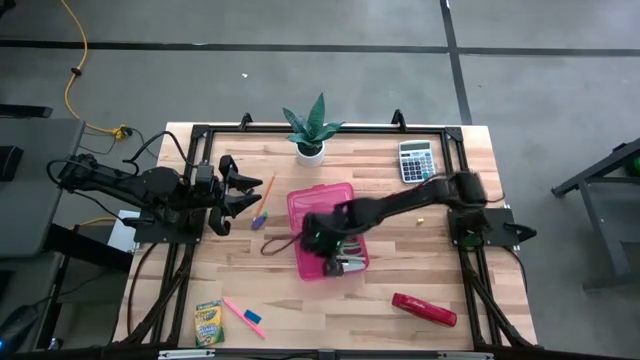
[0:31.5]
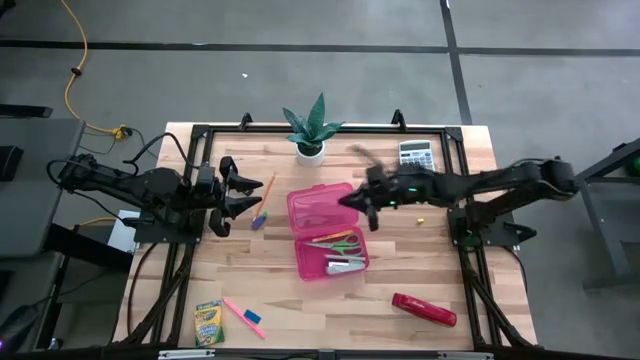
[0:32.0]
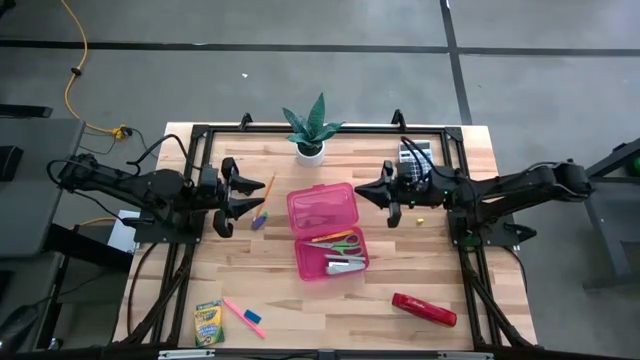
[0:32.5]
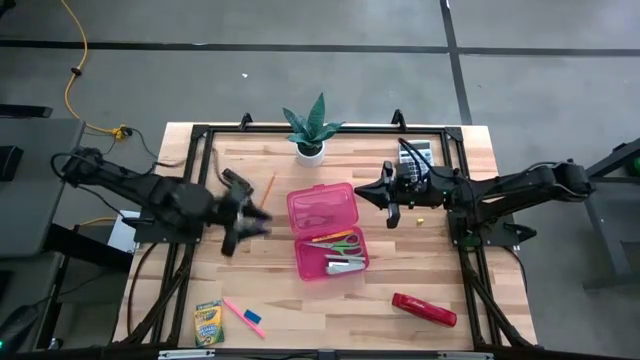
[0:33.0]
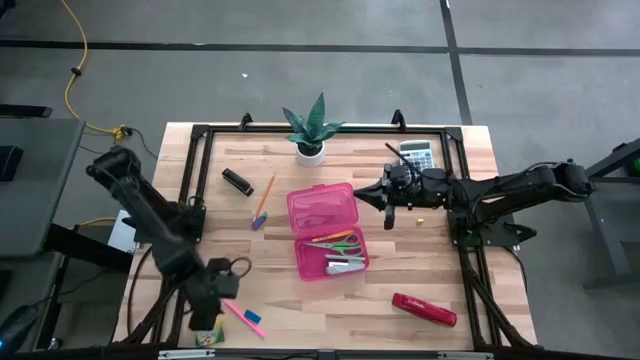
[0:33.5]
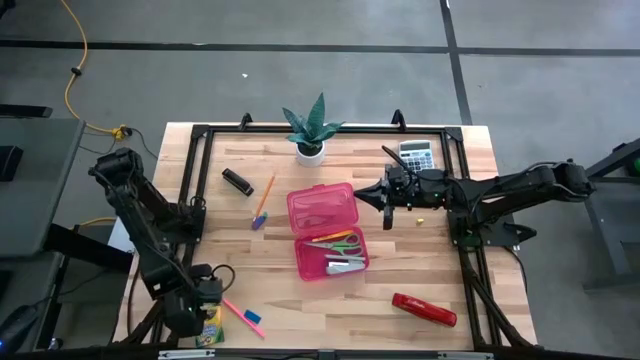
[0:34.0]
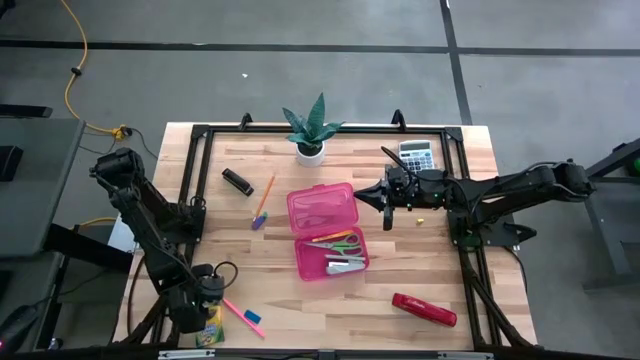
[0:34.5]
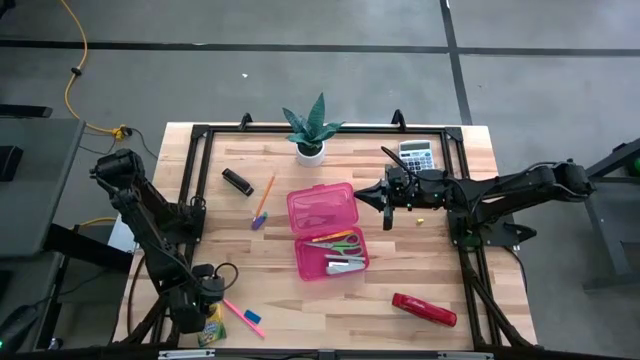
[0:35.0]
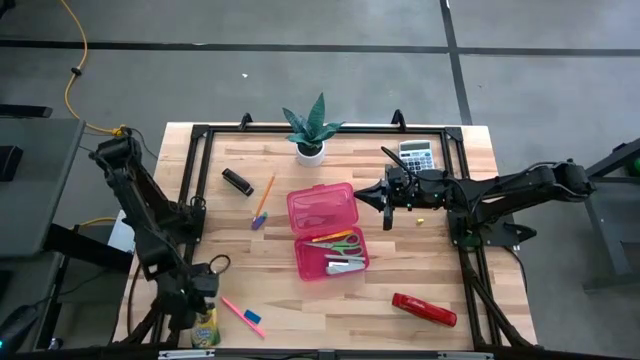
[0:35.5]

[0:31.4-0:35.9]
Task: Pack school essentials
Put the yellow crayon box into the red supply box

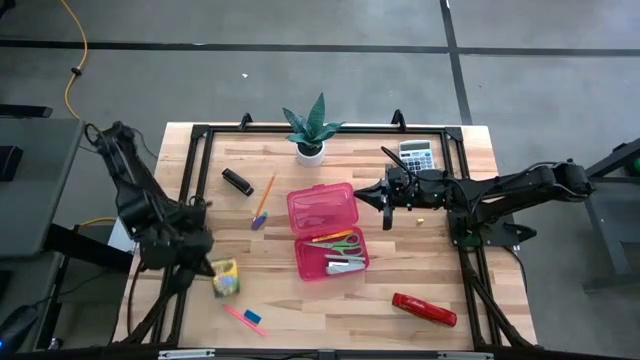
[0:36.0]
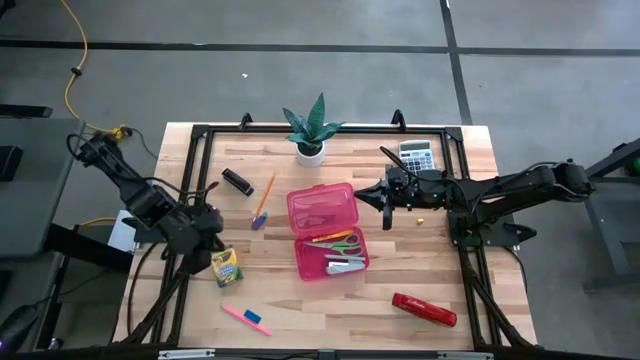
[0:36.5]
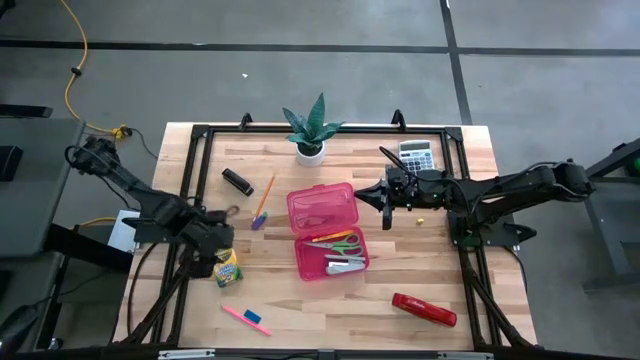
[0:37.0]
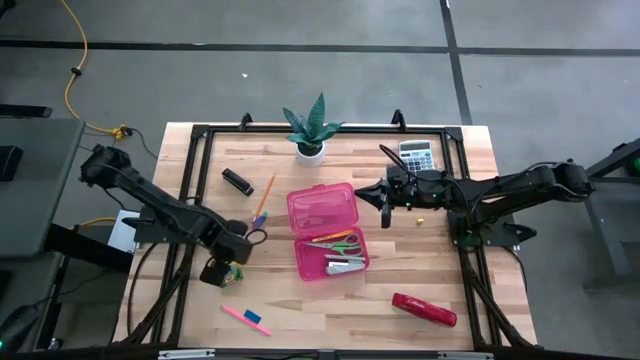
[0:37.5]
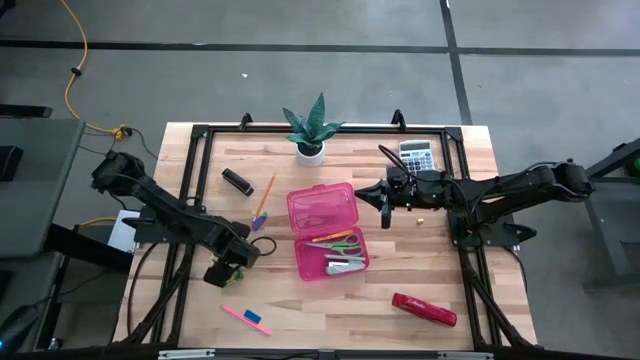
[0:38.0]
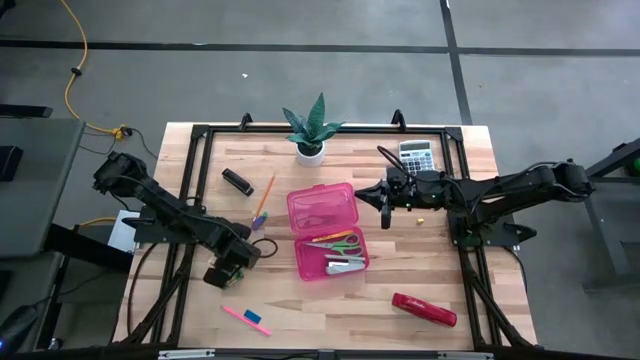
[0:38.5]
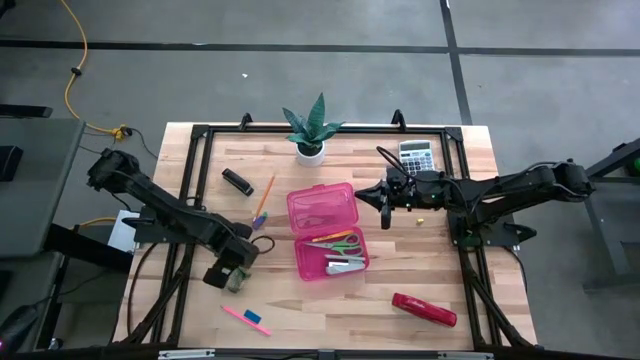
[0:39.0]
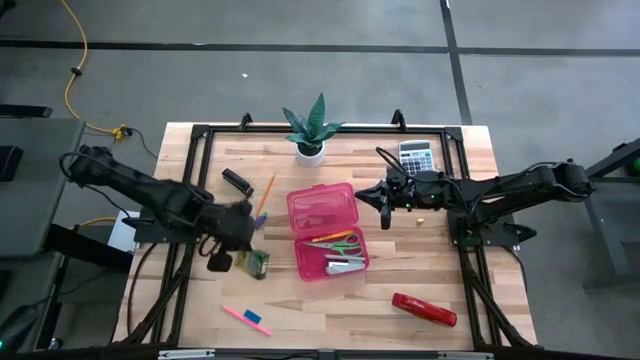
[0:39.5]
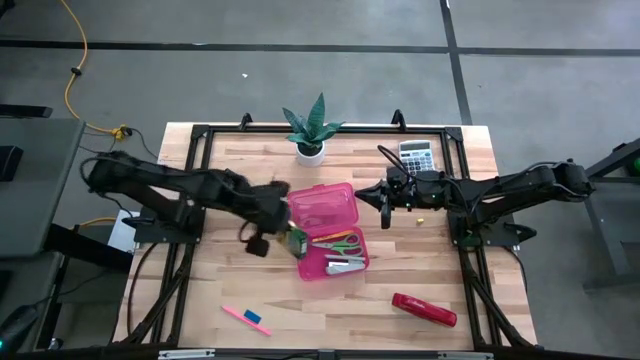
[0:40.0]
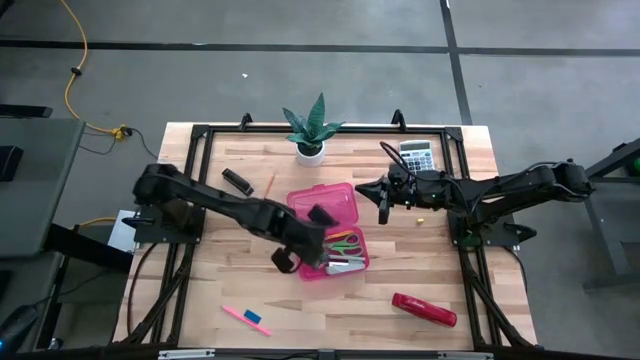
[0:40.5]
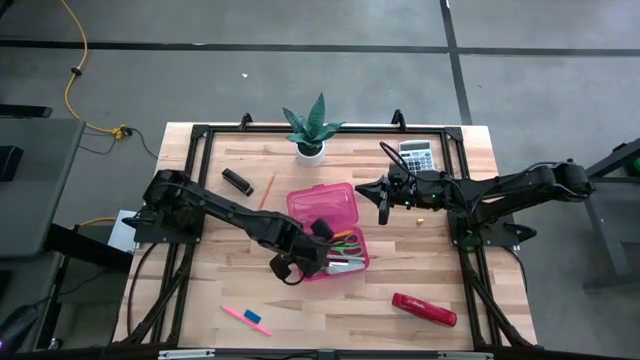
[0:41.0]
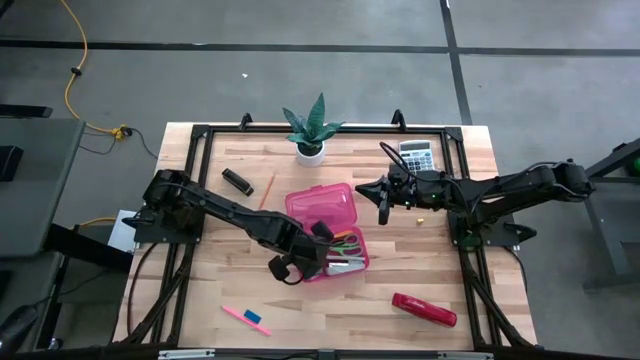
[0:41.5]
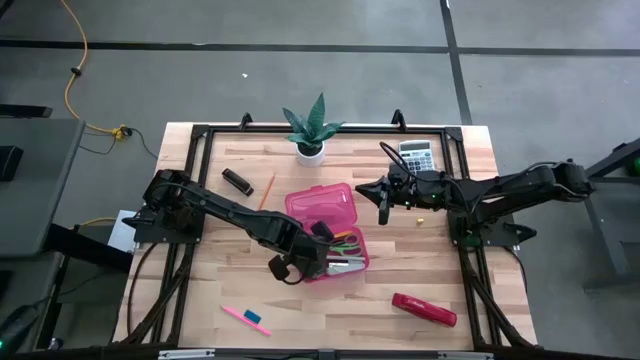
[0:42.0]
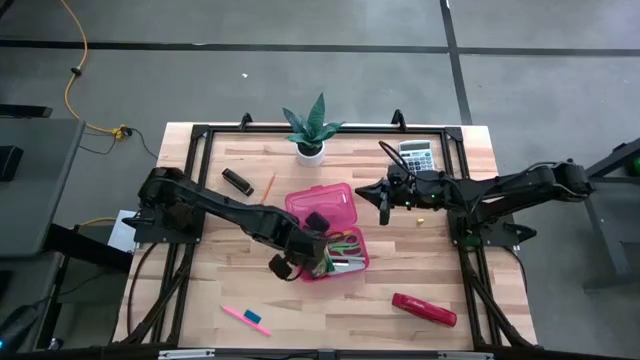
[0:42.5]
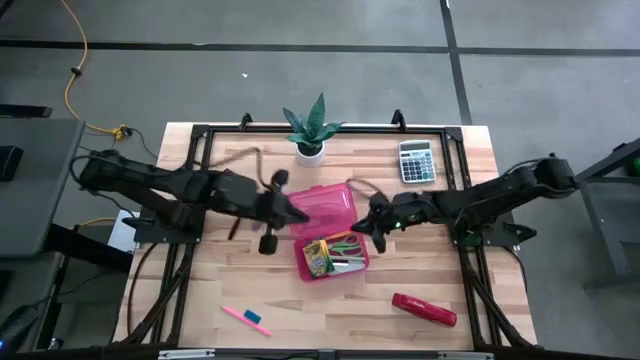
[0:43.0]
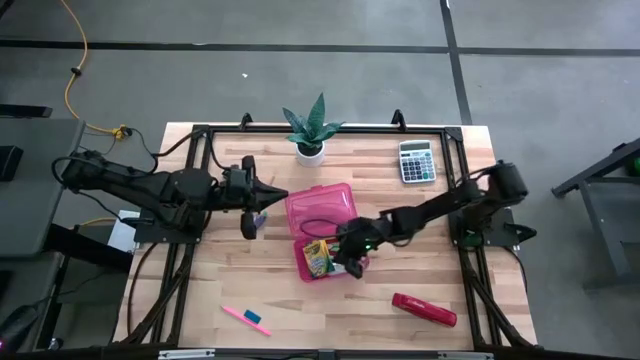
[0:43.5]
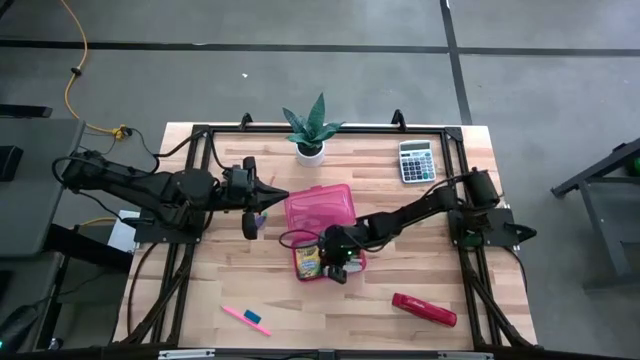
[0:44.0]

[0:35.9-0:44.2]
Put the yellow crayon box into the red supply box

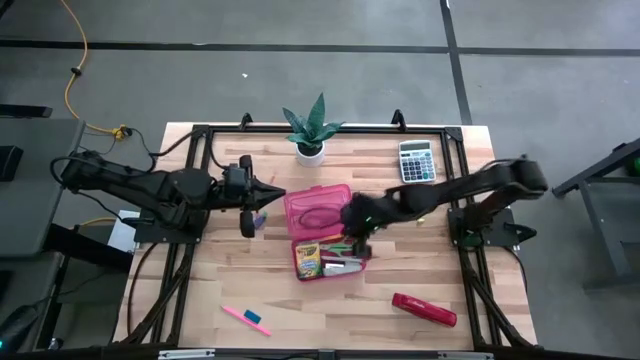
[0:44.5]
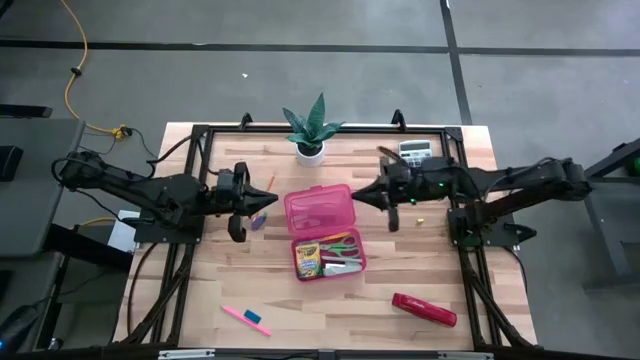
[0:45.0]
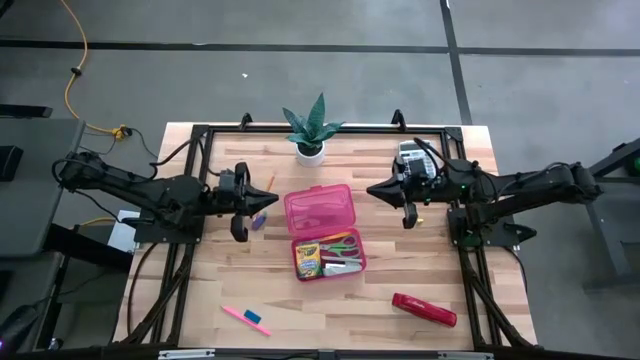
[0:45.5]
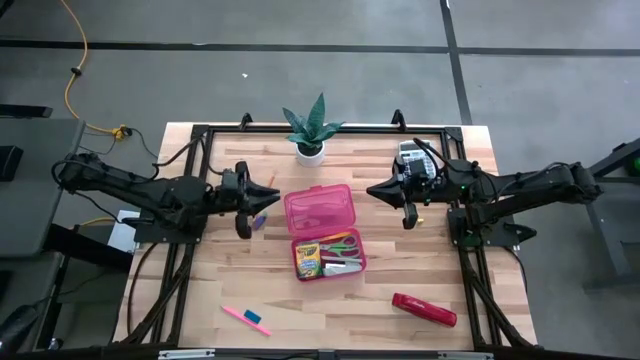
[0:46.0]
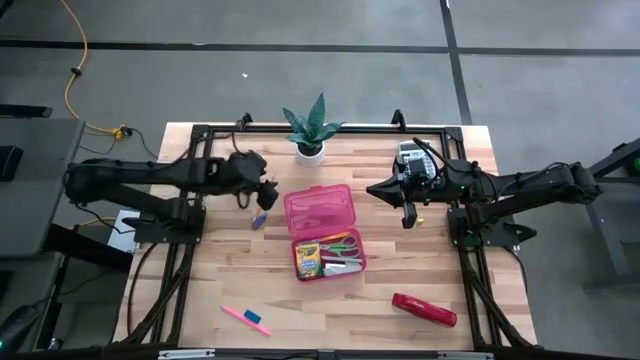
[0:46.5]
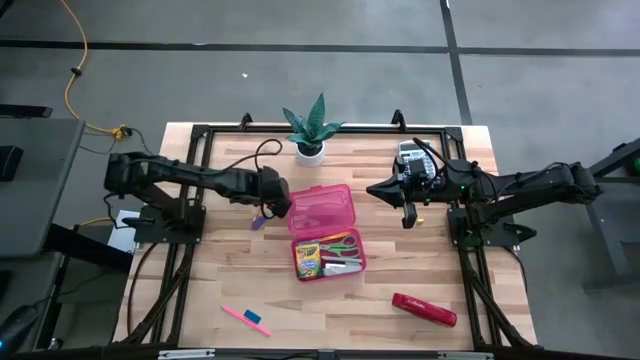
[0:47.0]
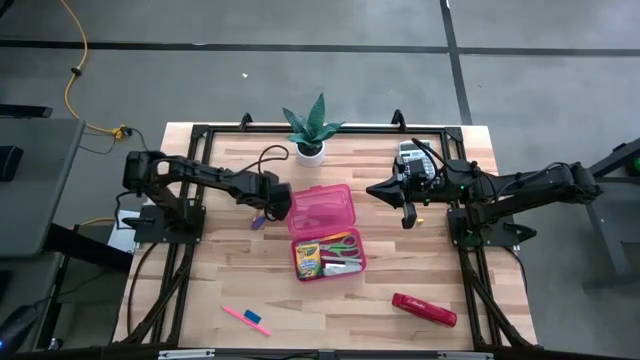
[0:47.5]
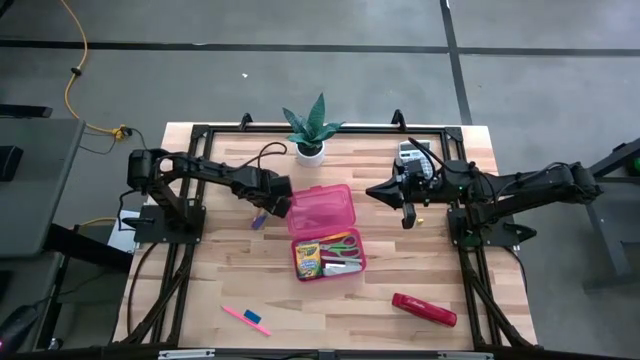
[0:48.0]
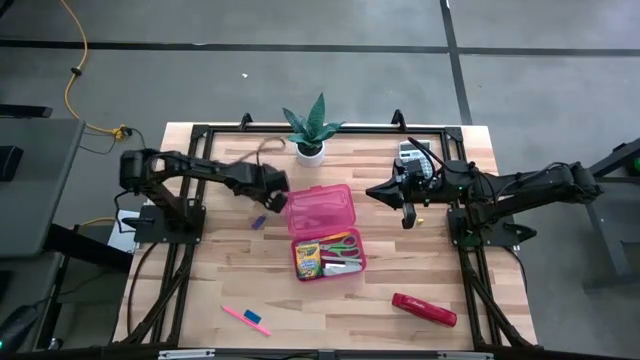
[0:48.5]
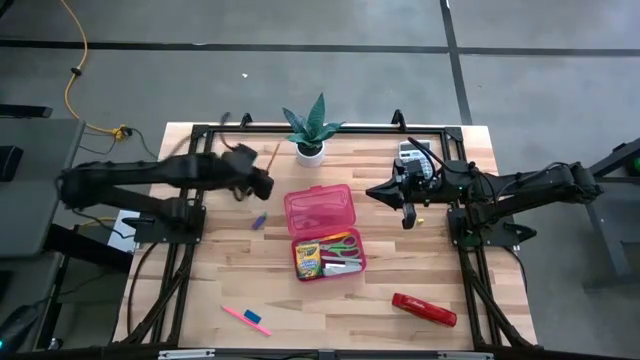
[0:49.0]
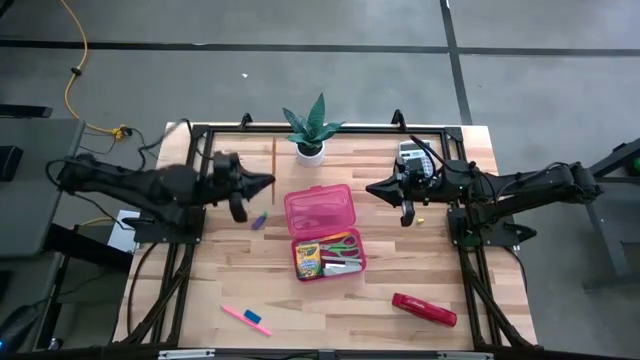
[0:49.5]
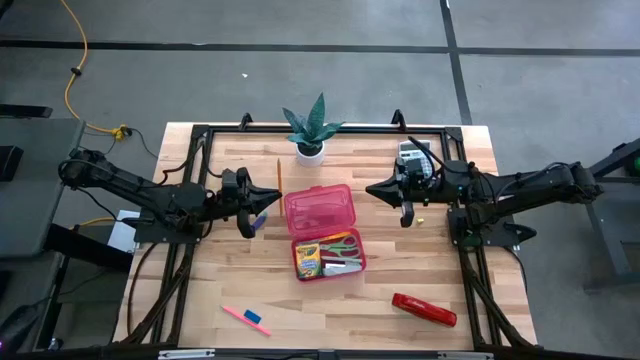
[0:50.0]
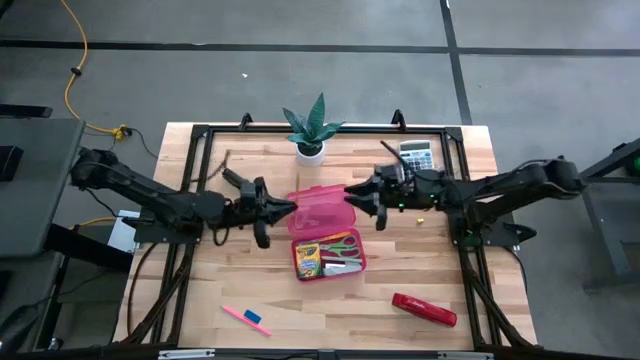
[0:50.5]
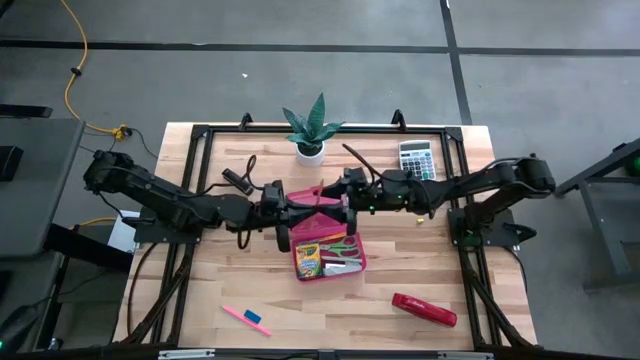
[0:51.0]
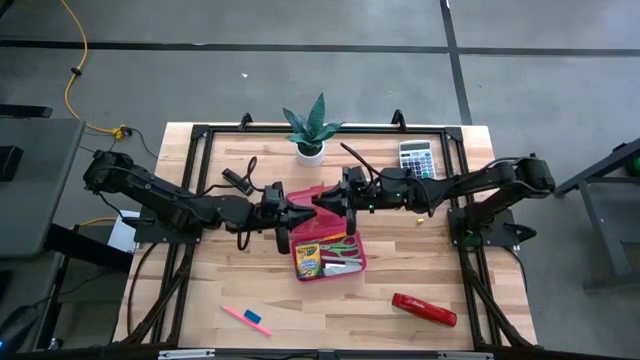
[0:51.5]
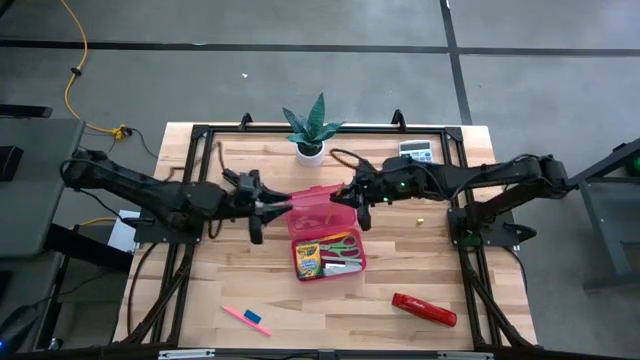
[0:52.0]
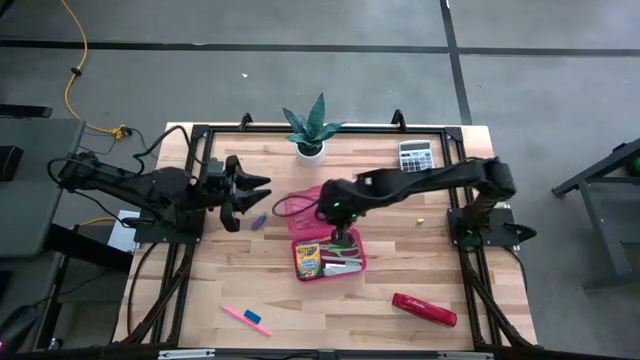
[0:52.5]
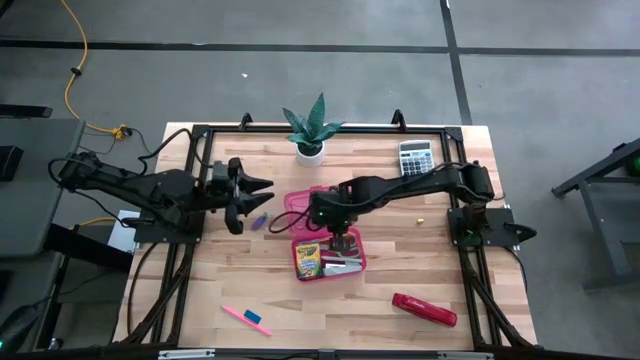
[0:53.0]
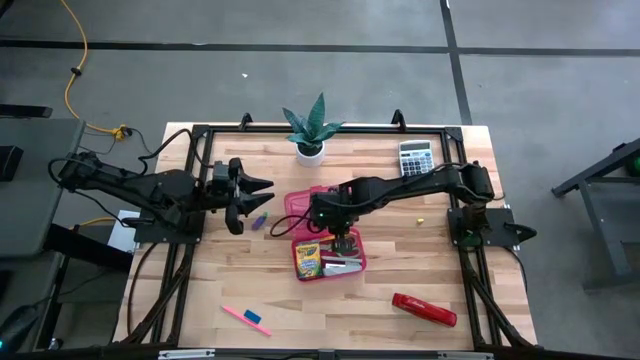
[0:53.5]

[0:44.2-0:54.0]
Put the yellow pencil into the red supply box
